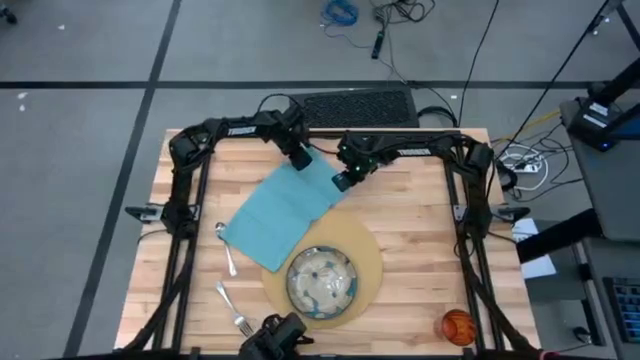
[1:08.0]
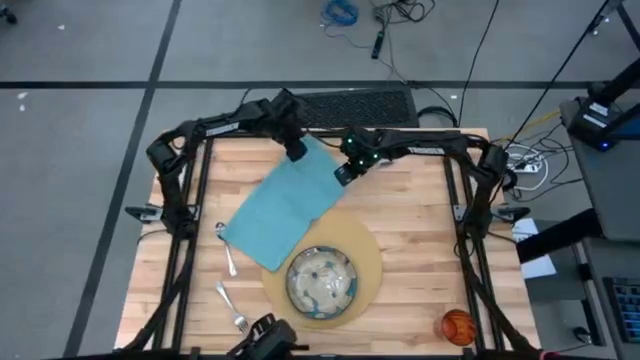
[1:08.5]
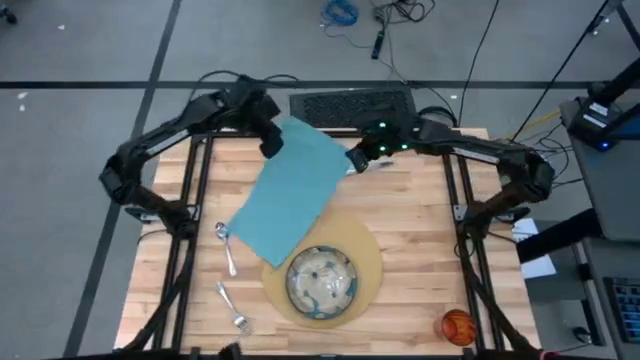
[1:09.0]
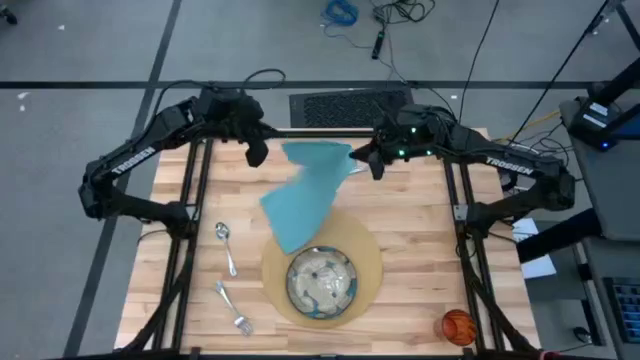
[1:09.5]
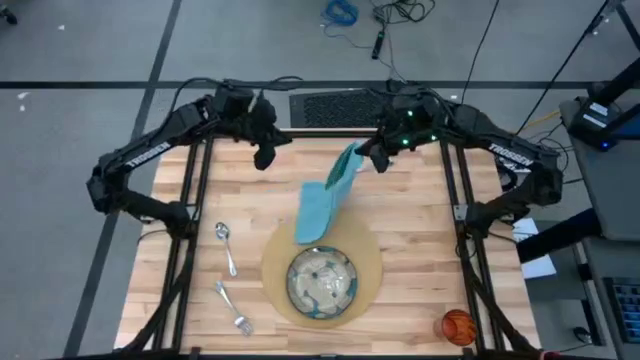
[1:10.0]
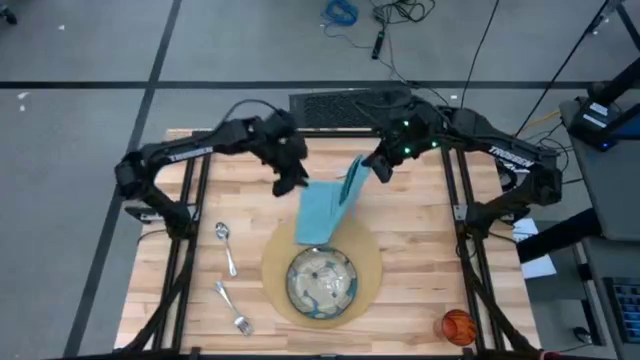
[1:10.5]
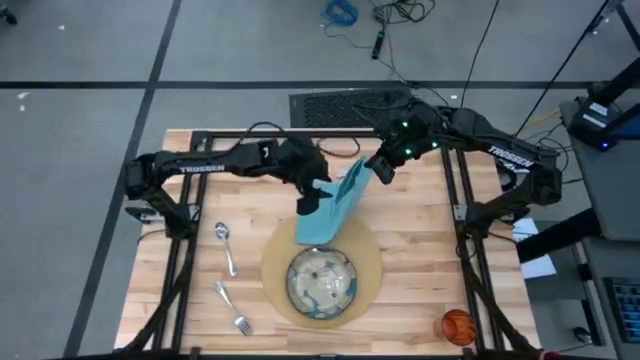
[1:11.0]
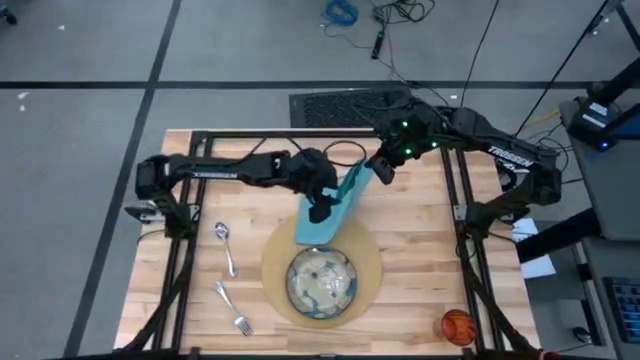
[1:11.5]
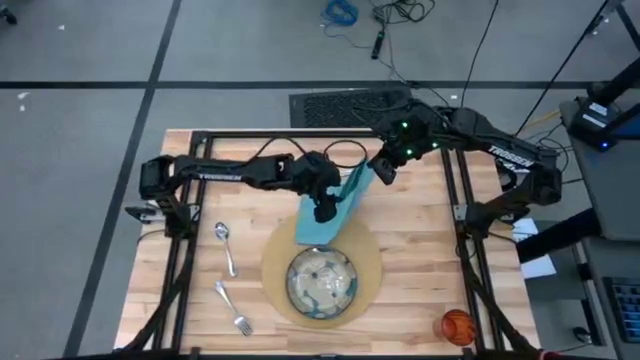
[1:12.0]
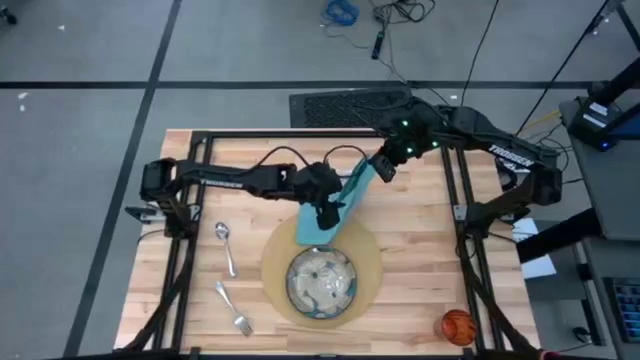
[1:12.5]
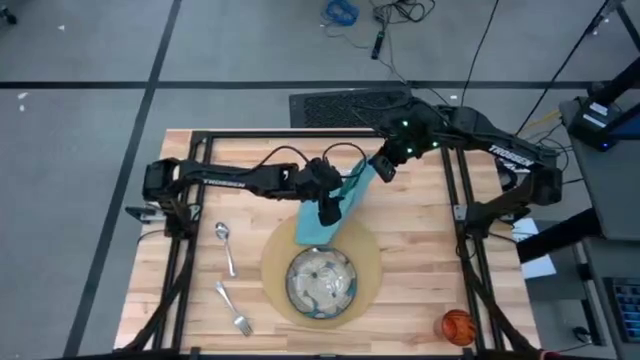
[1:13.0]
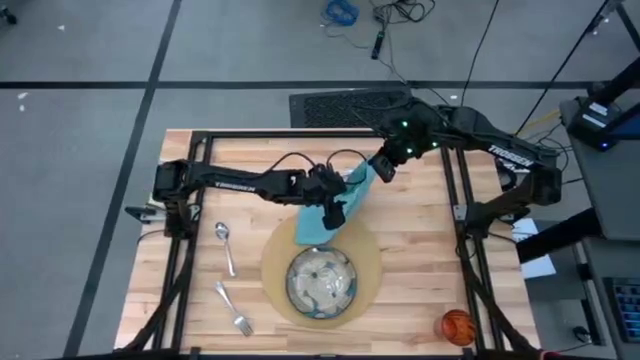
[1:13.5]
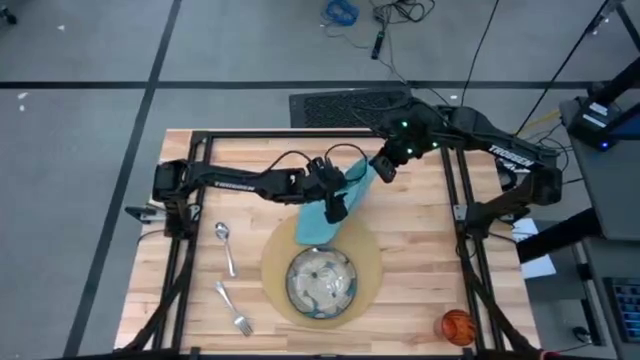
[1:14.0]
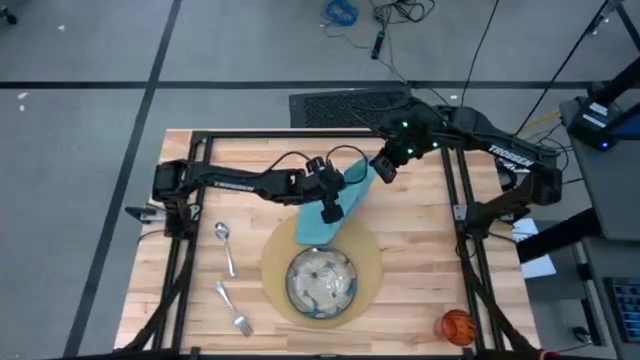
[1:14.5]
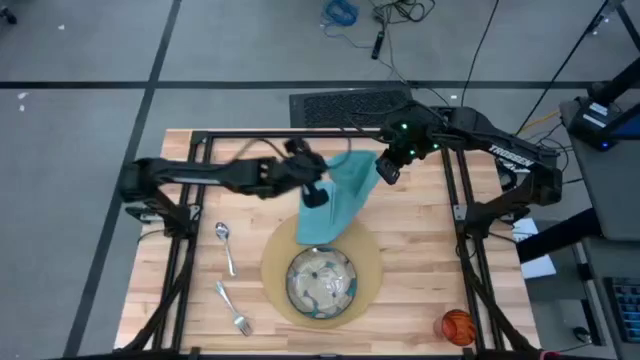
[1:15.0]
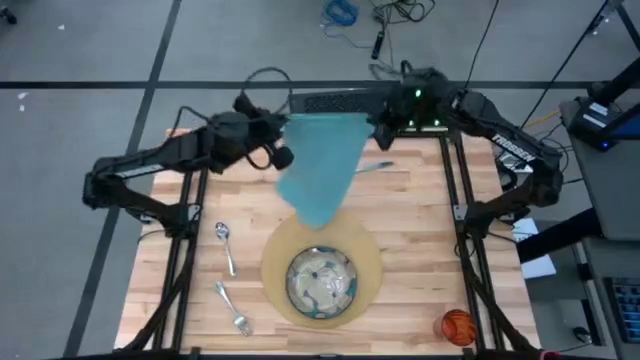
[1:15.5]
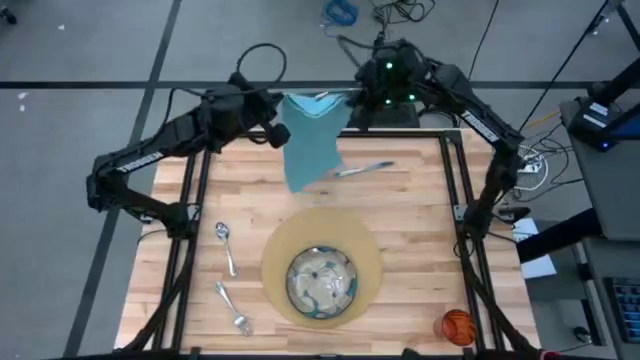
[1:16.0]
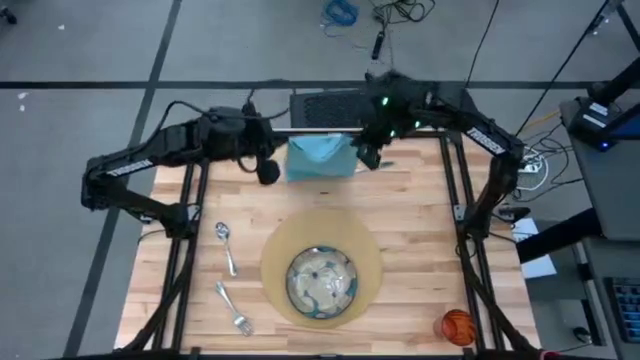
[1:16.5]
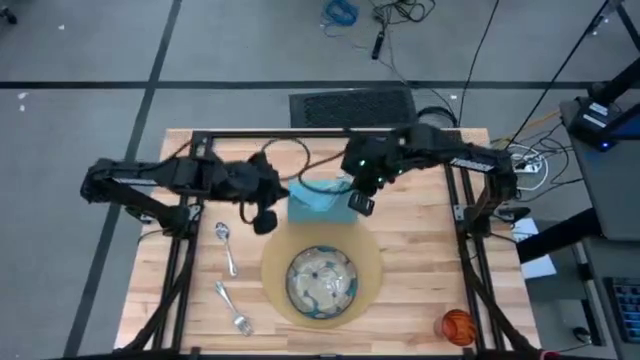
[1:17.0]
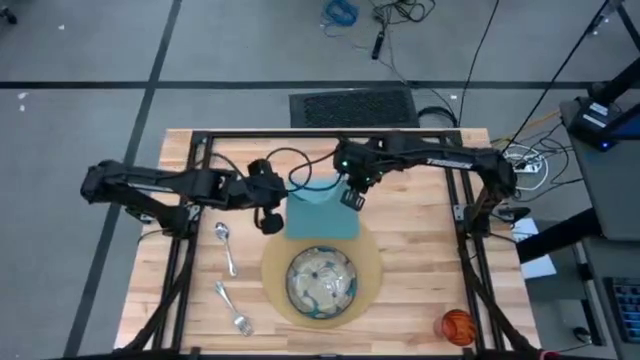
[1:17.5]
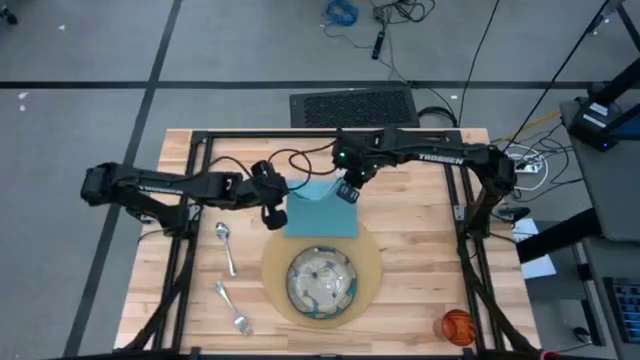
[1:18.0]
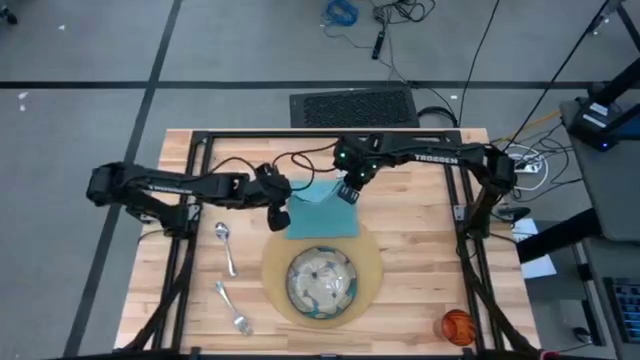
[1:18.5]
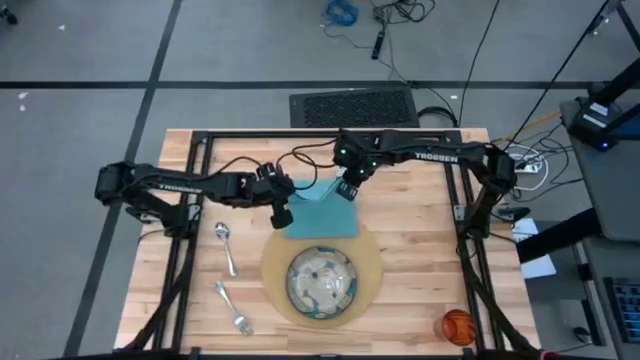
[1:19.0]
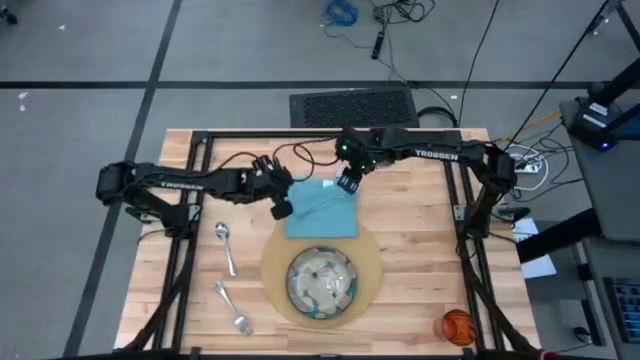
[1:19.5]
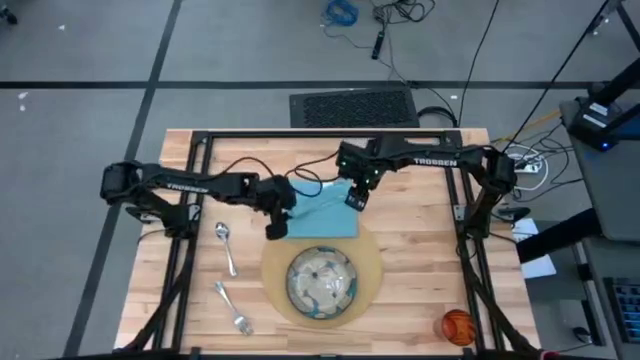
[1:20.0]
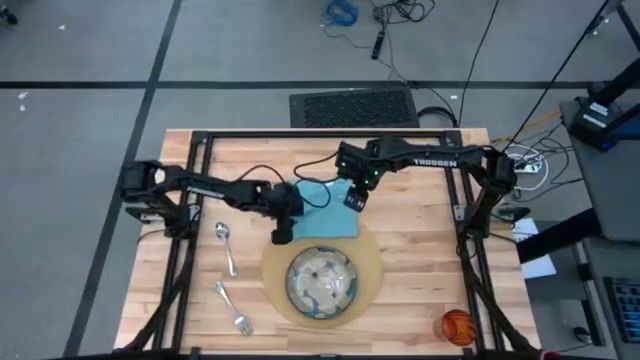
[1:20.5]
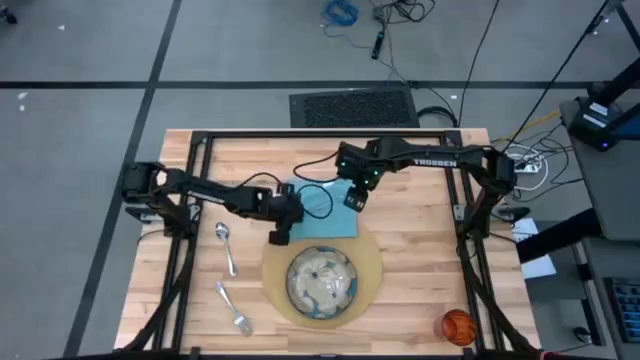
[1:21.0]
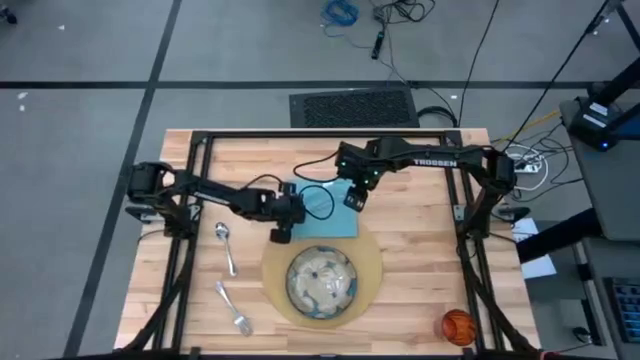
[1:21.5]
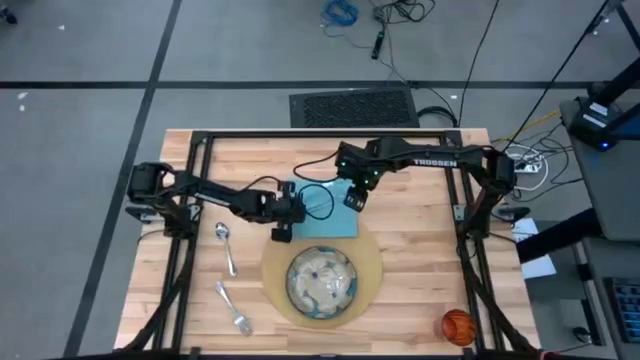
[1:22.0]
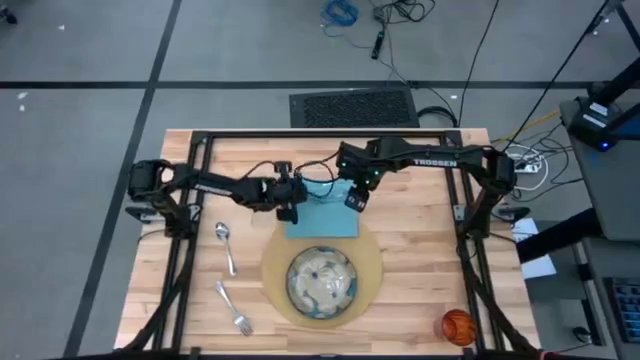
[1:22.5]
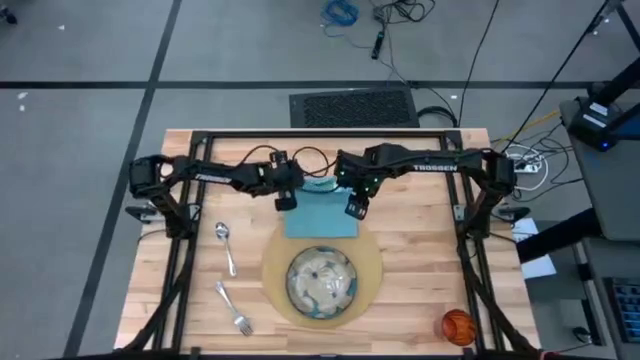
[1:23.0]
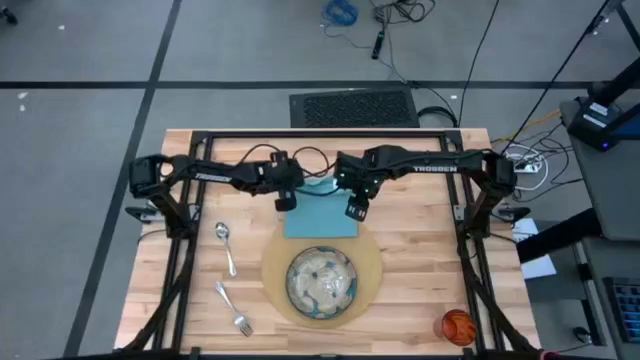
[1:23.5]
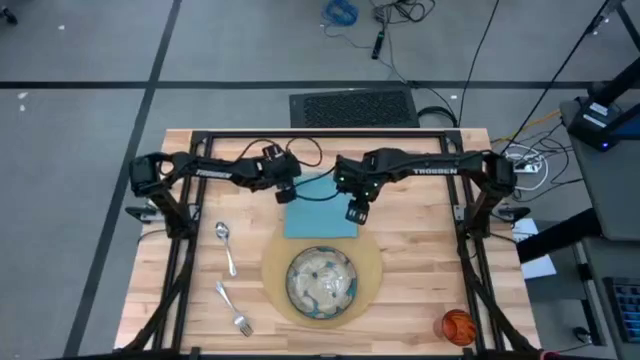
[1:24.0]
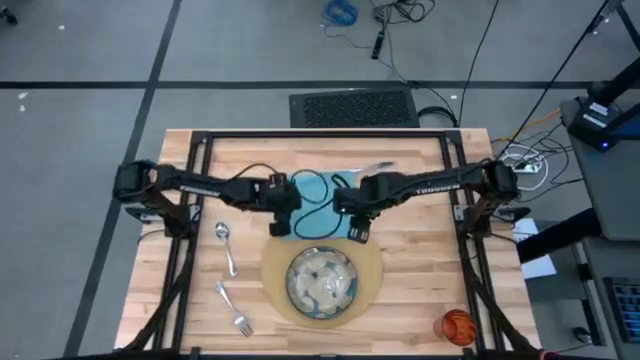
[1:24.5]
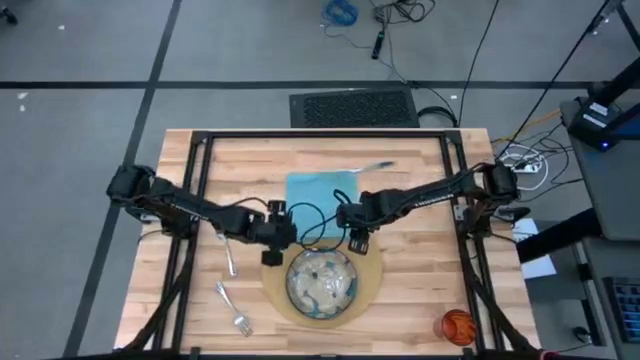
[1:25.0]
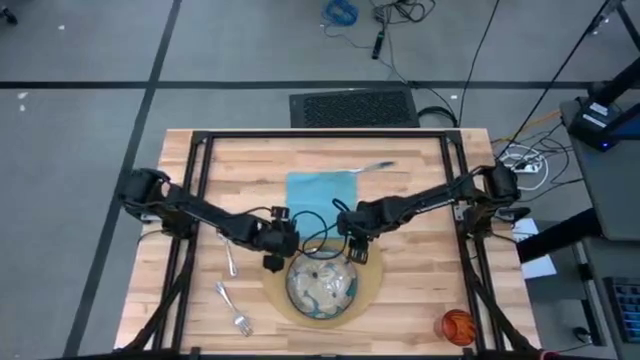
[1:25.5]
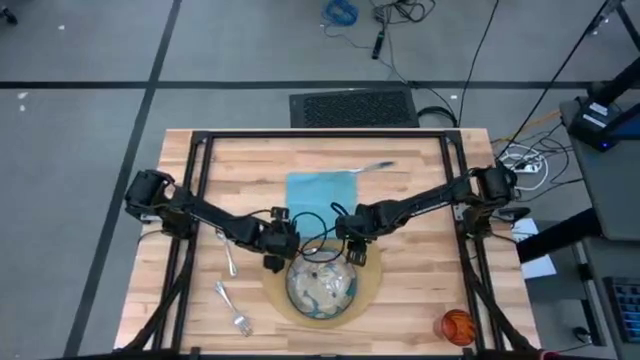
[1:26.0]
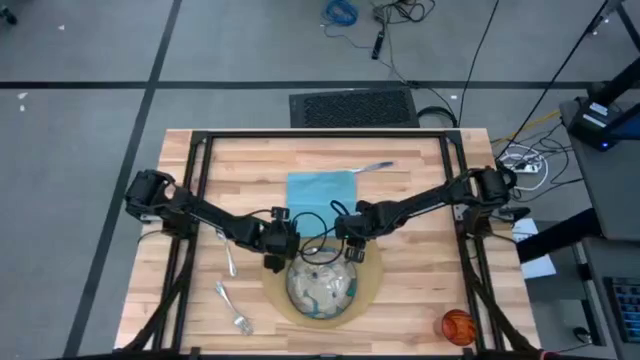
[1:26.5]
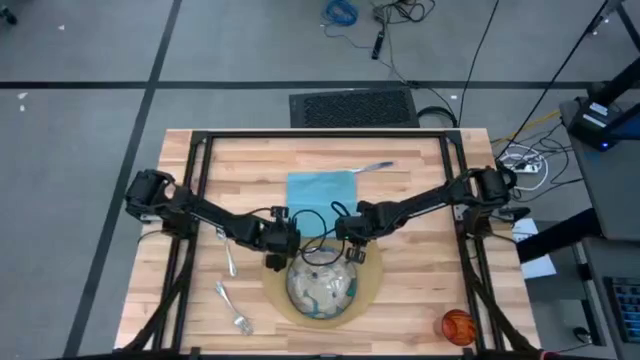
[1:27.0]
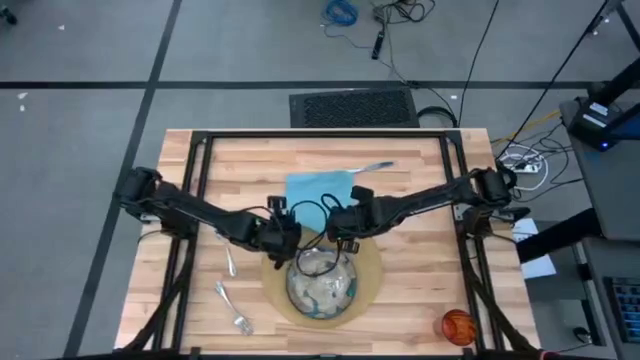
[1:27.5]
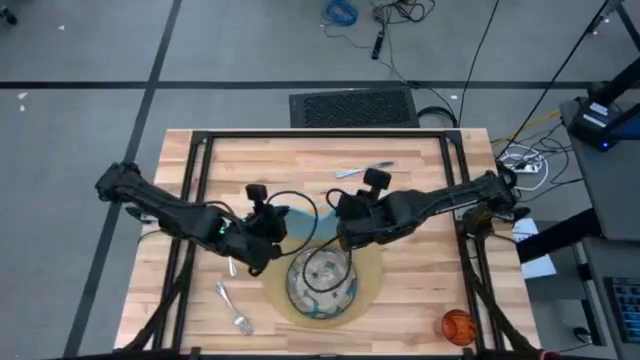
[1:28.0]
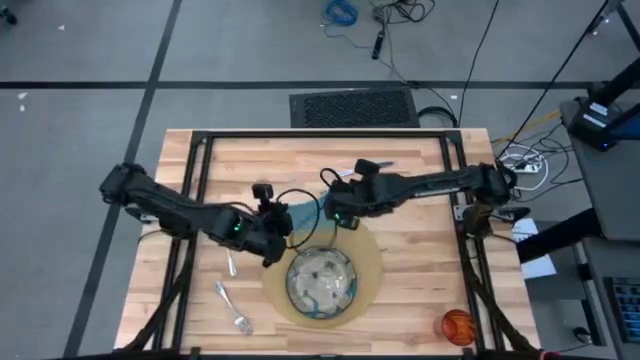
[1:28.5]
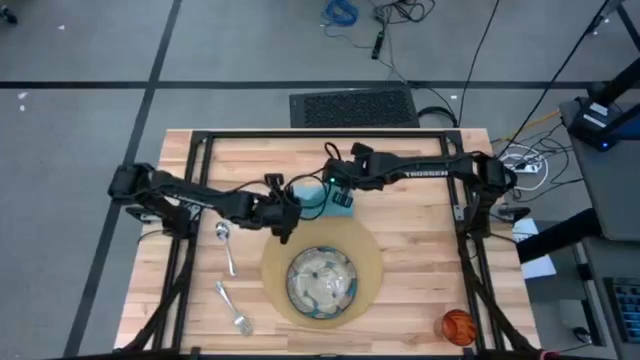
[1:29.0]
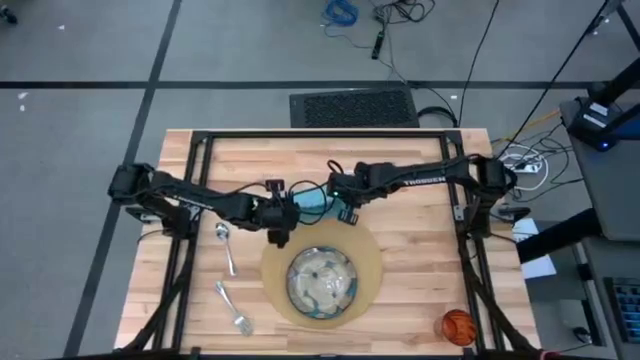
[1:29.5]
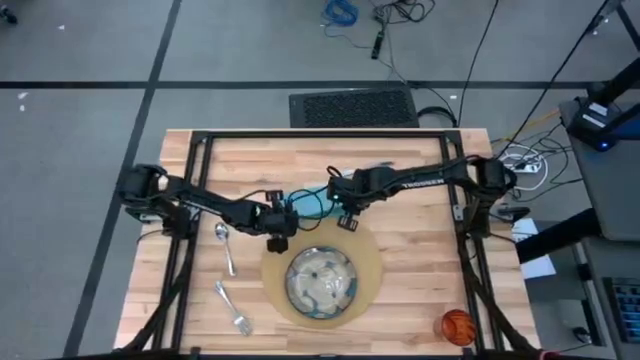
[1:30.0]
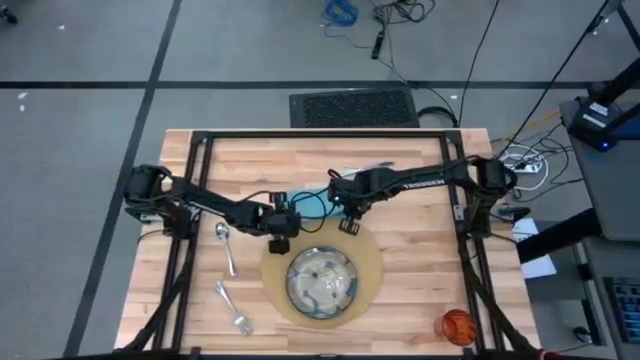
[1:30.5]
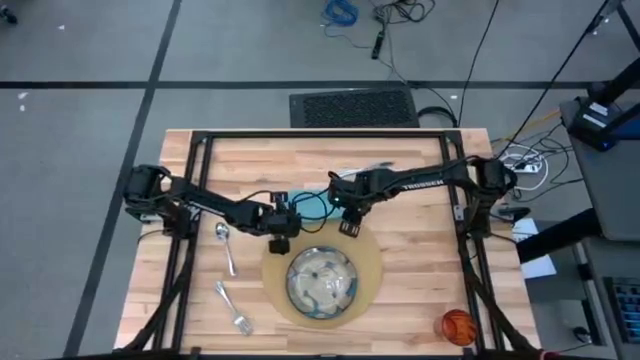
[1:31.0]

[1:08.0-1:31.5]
Task: Set table place
Fold the blue napkin
